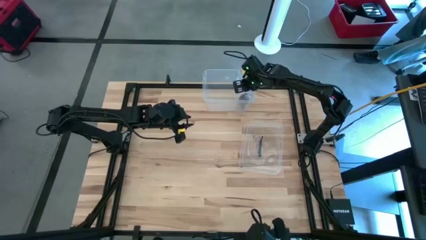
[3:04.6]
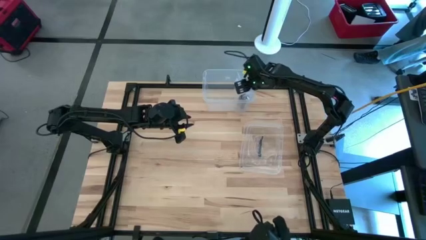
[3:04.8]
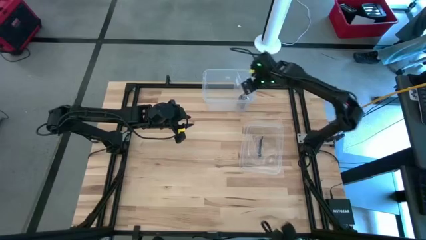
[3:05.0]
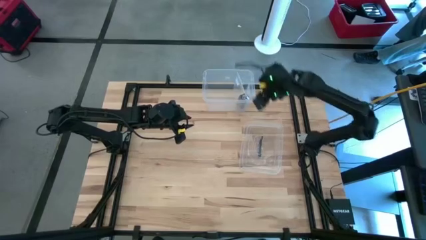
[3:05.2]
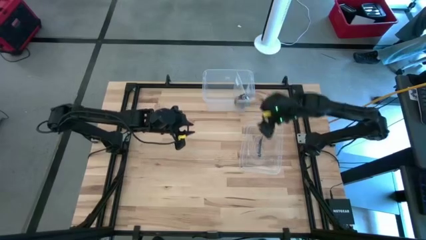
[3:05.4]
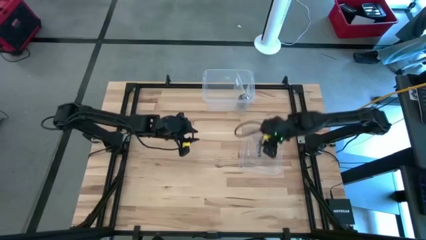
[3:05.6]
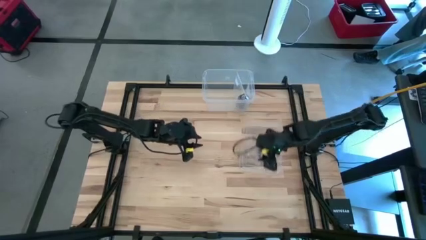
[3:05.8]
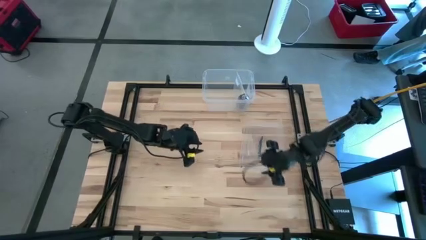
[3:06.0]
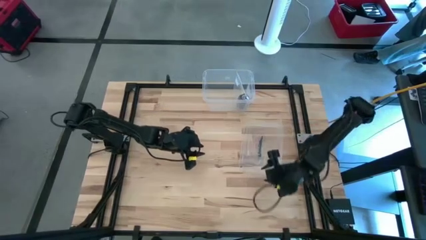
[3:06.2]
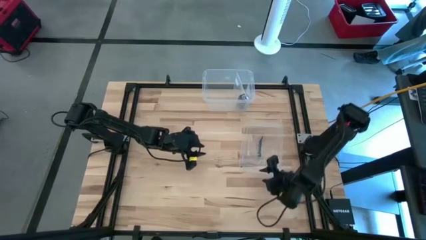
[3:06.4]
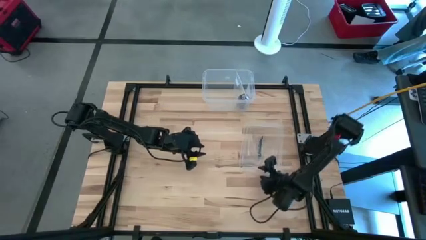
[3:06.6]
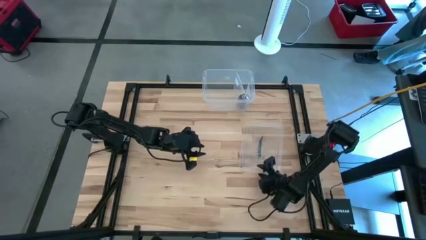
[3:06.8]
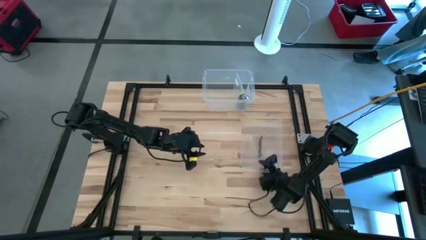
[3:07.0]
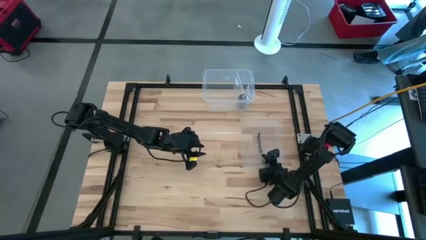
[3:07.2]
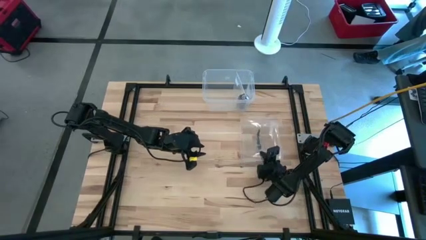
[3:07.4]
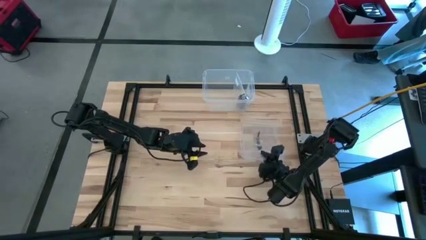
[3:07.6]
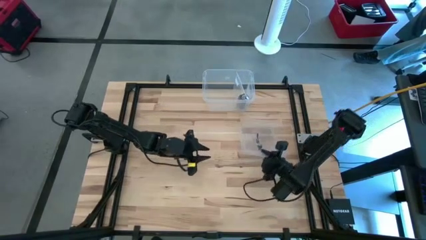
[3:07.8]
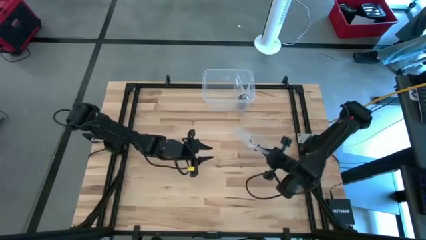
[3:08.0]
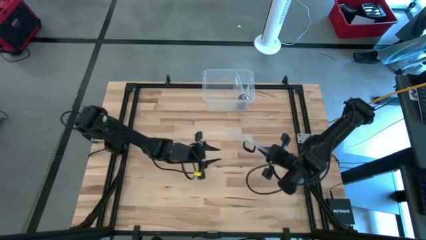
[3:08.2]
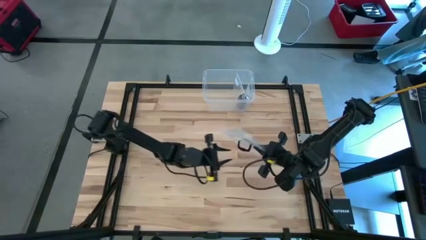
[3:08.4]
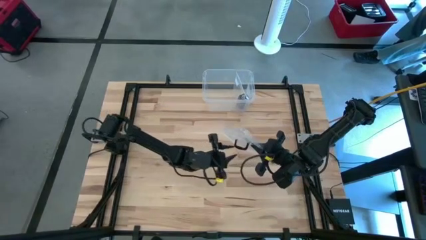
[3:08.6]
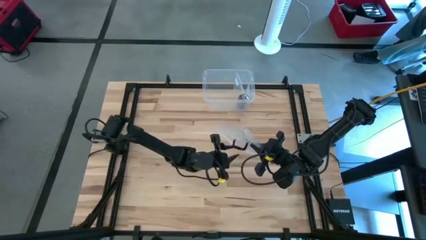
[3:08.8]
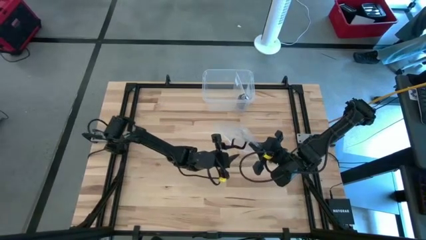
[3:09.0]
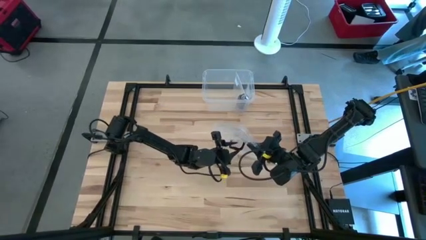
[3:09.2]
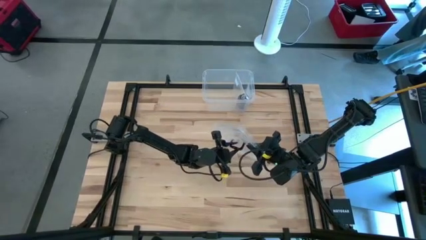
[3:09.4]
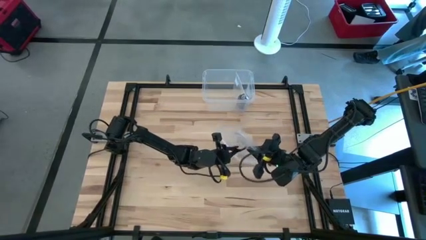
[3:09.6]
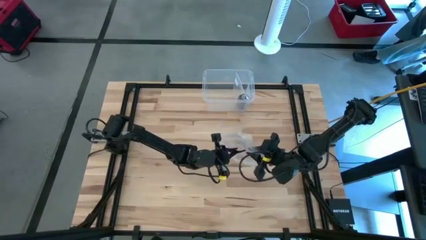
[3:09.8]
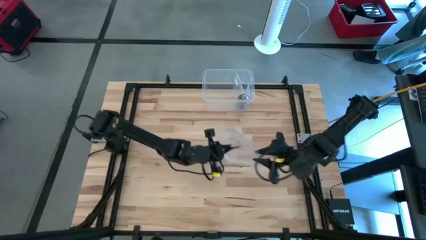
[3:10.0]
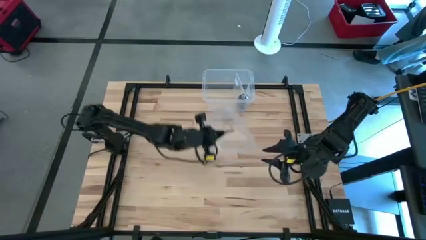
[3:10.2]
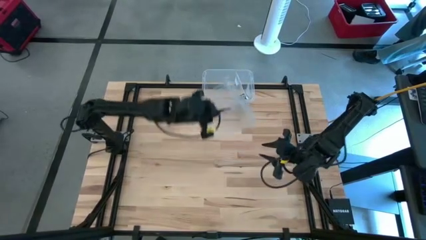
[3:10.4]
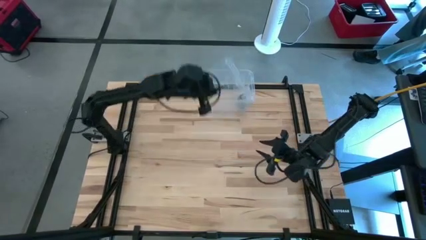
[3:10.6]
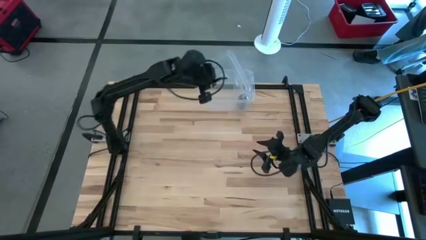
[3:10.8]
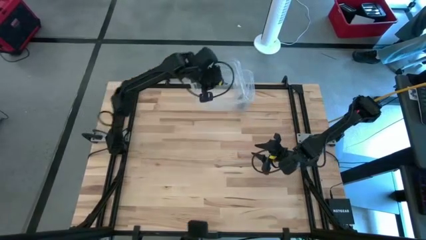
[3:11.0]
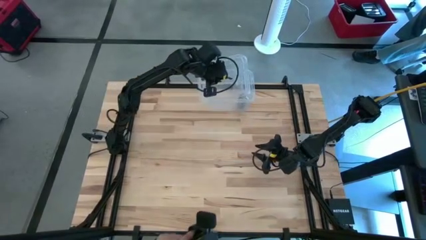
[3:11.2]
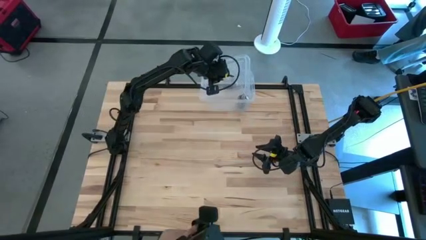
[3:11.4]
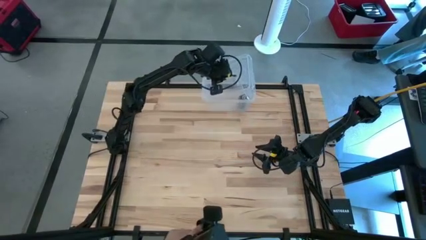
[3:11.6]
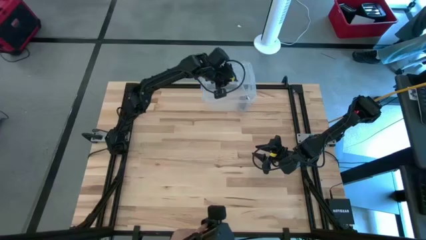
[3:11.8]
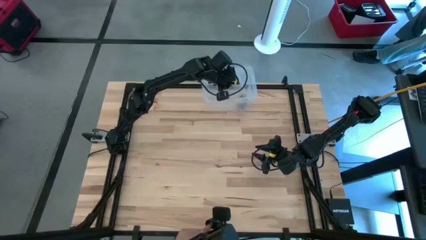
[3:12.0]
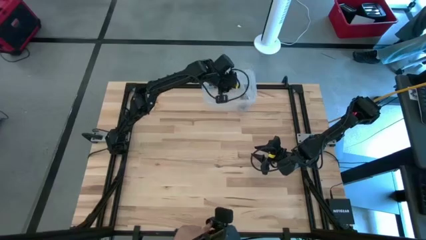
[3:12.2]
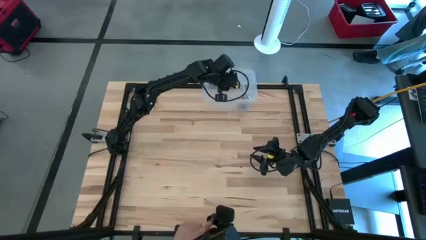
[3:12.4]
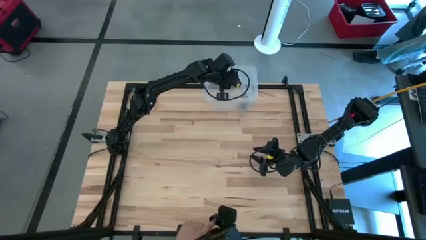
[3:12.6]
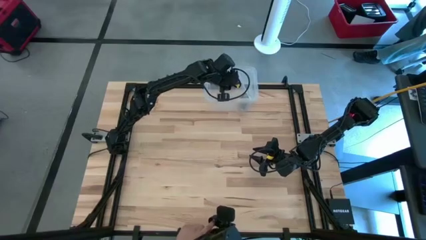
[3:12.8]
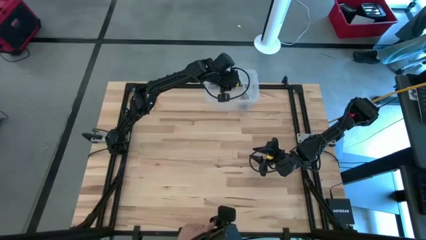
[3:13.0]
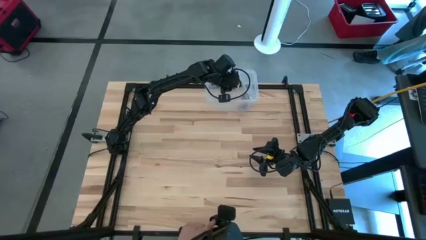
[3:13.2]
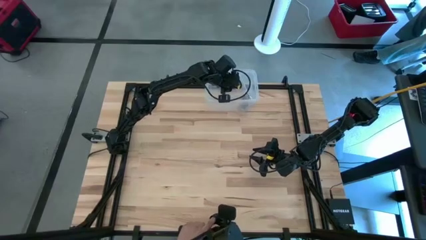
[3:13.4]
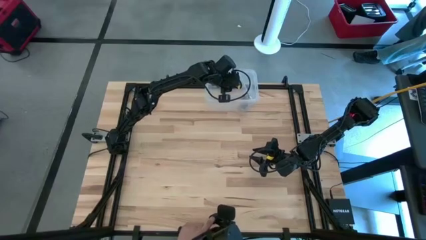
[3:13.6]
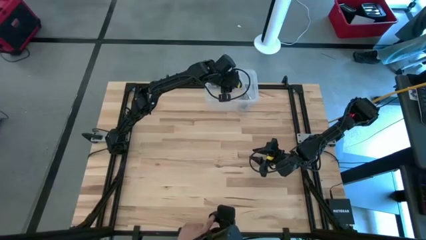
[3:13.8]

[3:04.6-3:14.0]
Task: Roll bandage
Close the transparent tupperware lid

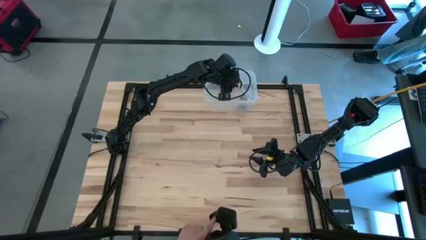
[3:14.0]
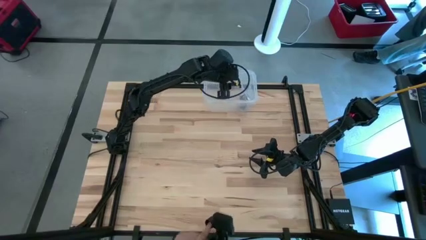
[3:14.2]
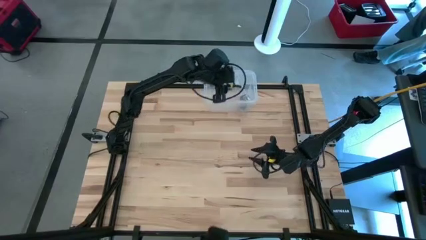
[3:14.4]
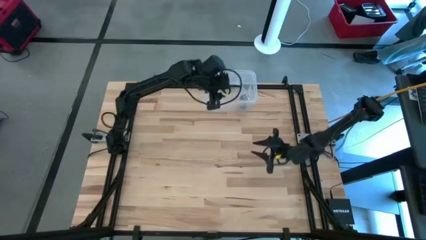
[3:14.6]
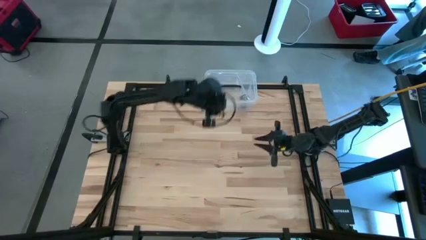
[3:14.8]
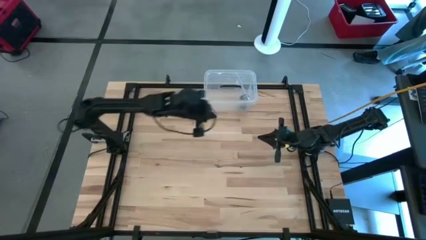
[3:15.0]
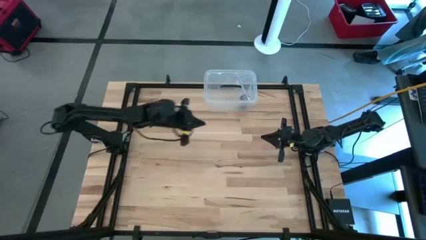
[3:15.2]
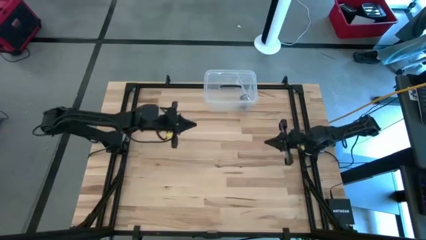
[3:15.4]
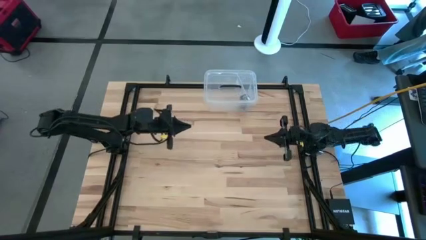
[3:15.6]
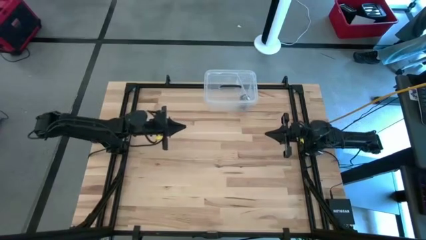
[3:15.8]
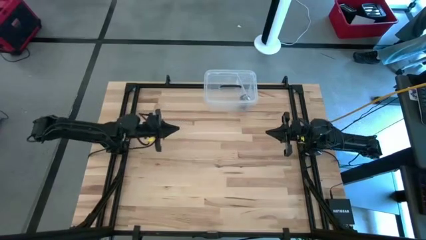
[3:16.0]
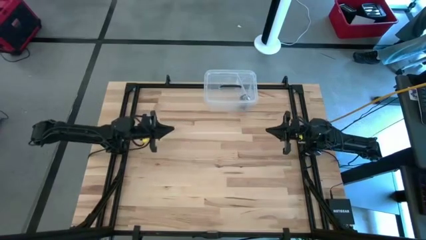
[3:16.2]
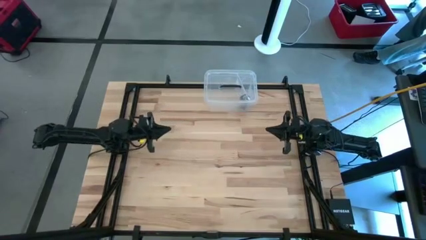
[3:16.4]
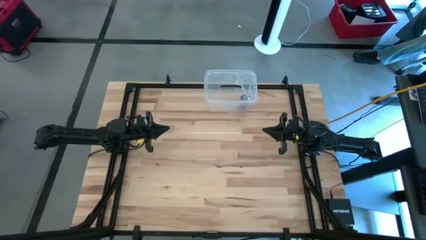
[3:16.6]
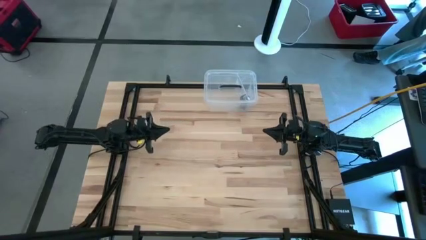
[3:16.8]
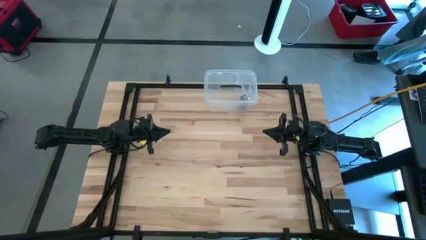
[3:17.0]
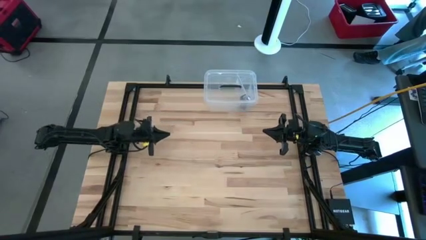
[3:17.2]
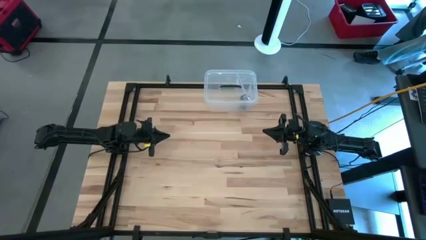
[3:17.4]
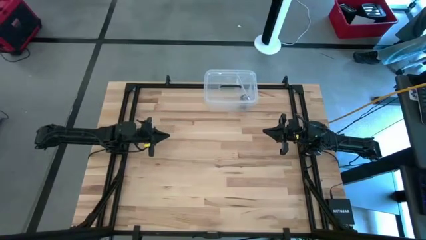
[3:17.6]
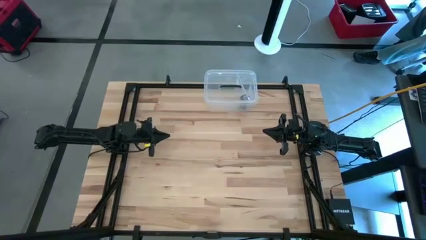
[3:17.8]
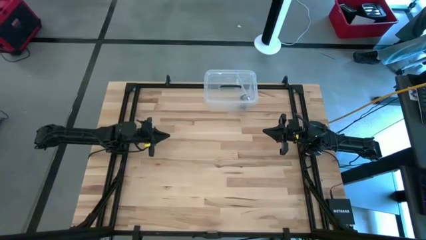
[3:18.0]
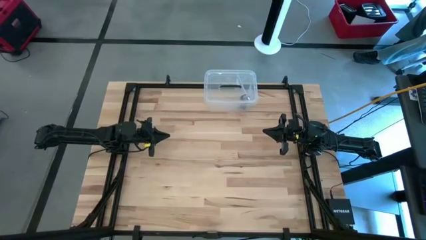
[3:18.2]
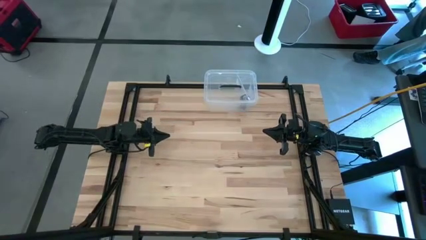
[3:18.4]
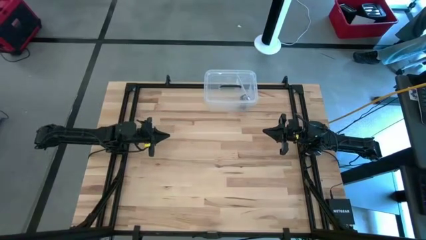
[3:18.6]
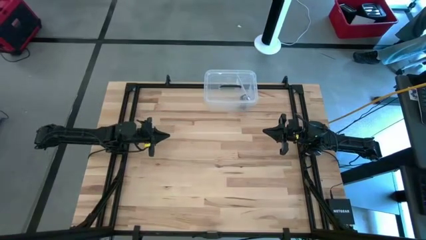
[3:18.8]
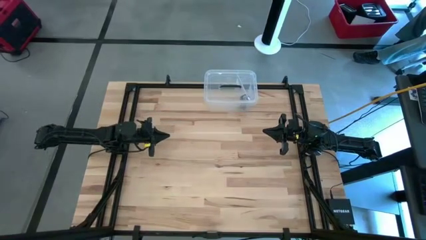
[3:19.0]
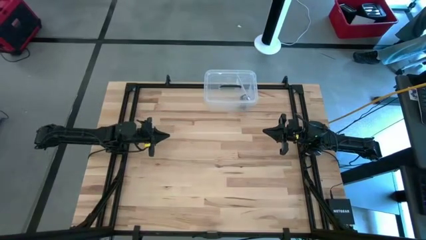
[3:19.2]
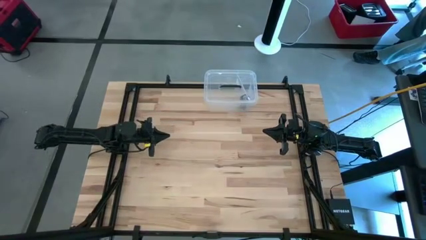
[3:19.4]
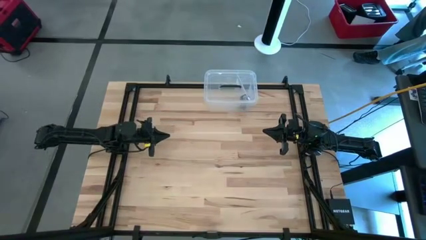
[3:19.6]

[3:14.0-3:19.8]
Return to Home Position
